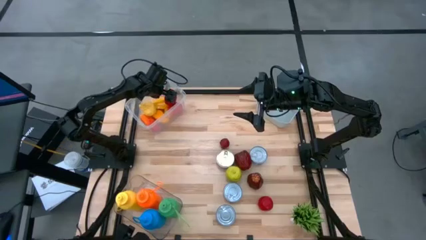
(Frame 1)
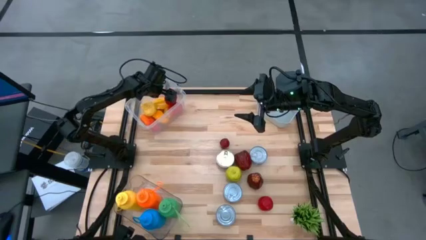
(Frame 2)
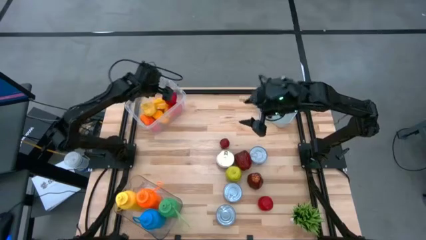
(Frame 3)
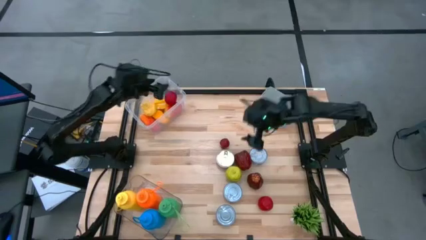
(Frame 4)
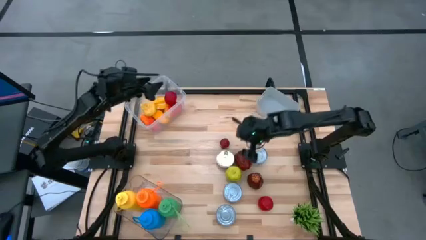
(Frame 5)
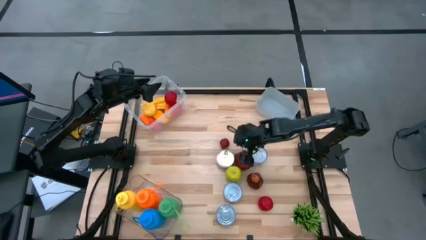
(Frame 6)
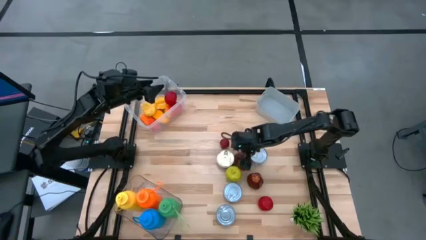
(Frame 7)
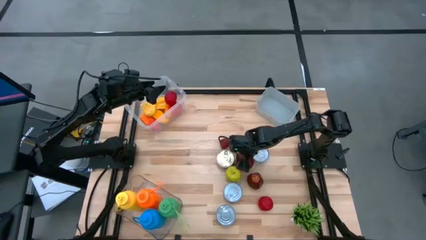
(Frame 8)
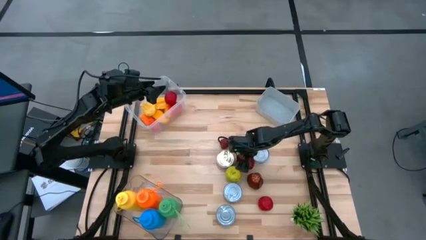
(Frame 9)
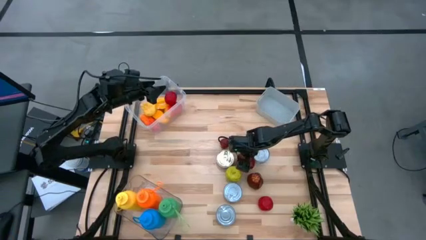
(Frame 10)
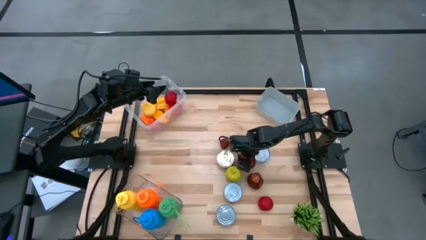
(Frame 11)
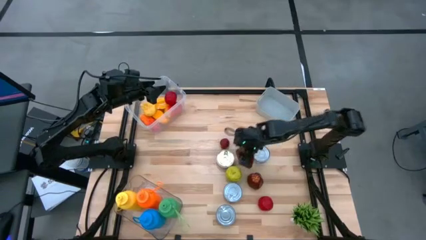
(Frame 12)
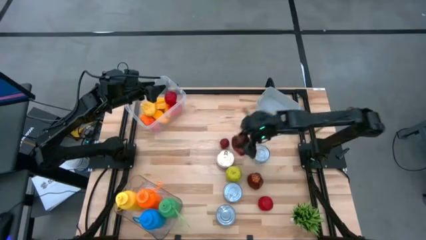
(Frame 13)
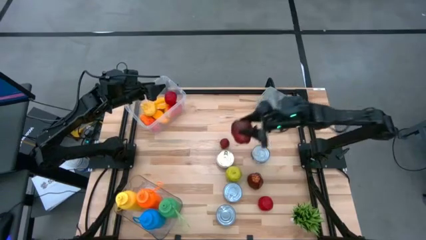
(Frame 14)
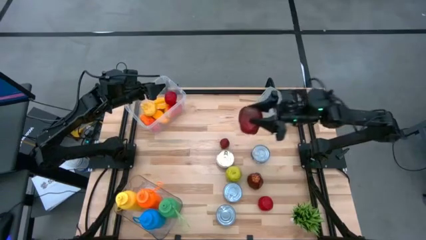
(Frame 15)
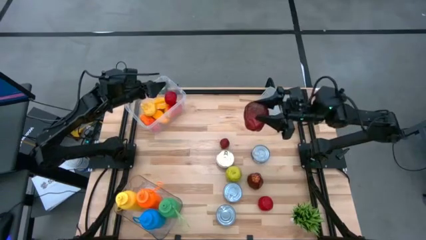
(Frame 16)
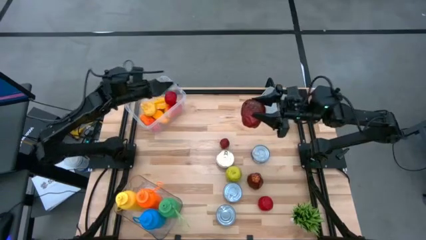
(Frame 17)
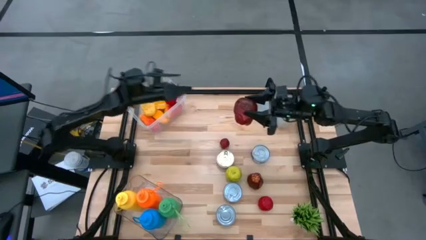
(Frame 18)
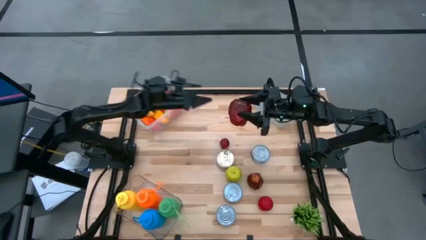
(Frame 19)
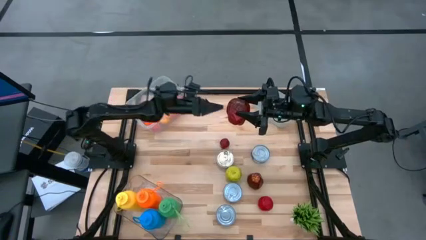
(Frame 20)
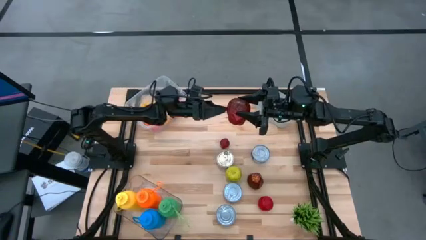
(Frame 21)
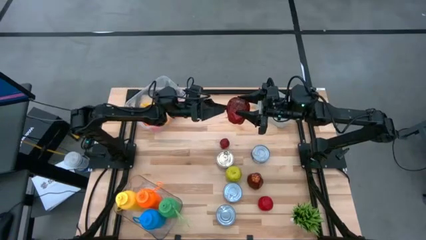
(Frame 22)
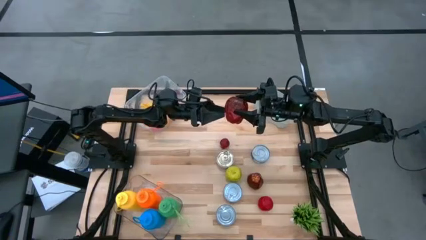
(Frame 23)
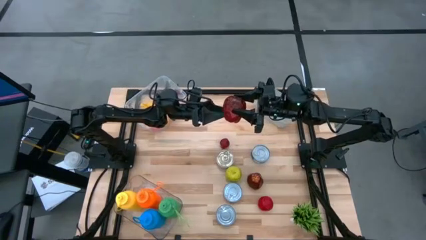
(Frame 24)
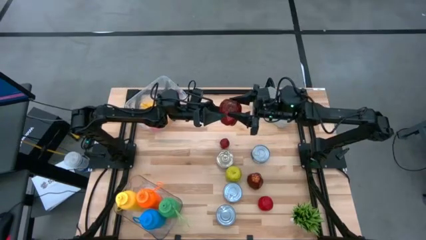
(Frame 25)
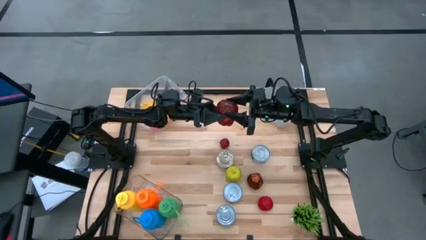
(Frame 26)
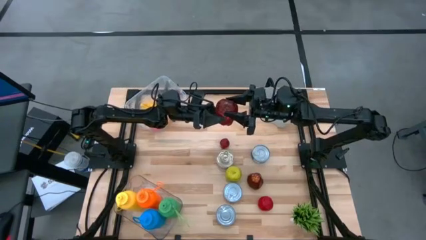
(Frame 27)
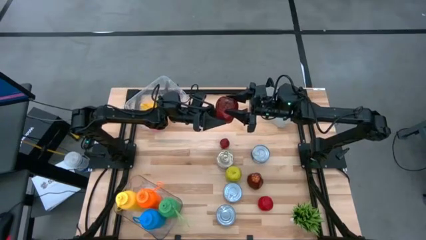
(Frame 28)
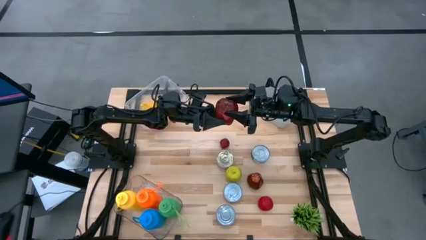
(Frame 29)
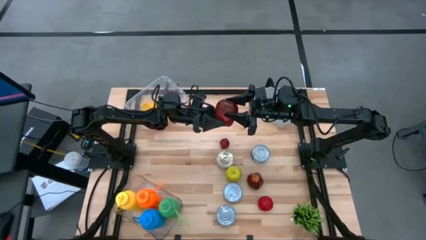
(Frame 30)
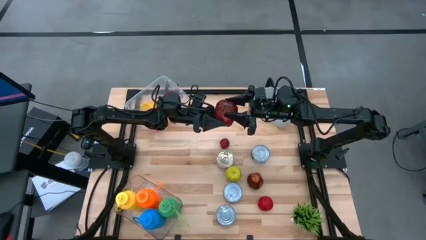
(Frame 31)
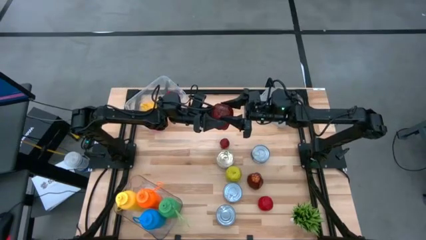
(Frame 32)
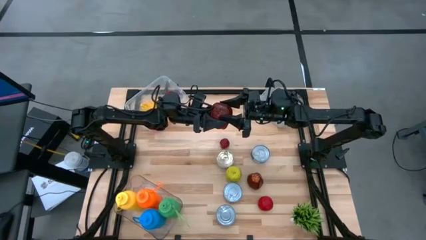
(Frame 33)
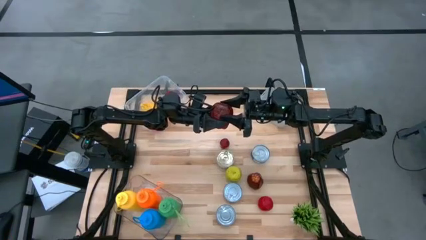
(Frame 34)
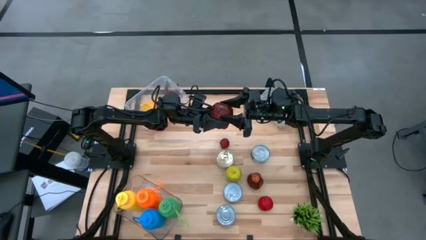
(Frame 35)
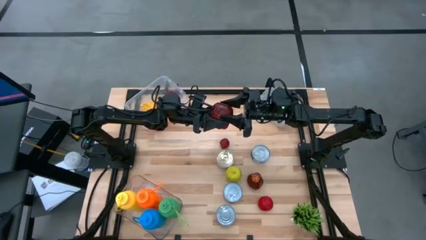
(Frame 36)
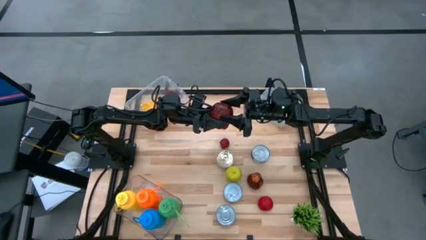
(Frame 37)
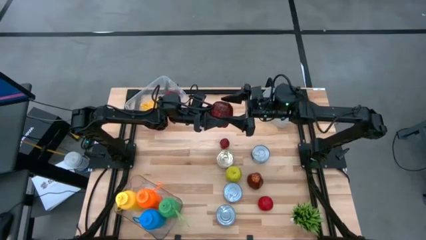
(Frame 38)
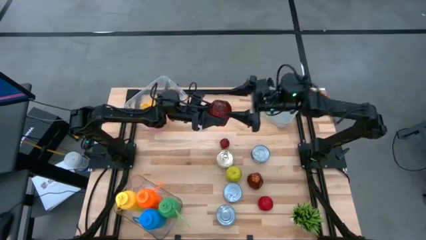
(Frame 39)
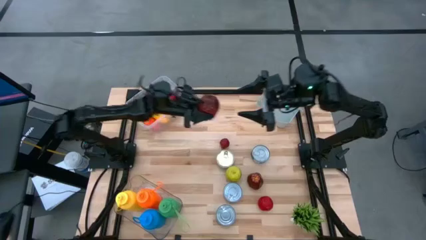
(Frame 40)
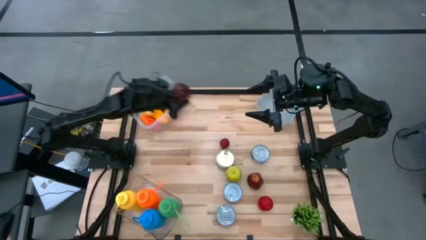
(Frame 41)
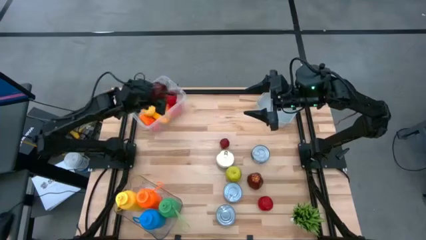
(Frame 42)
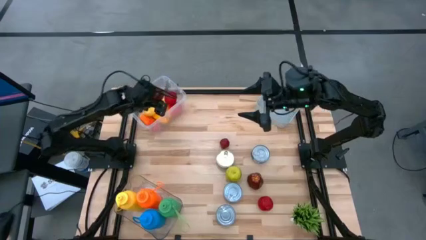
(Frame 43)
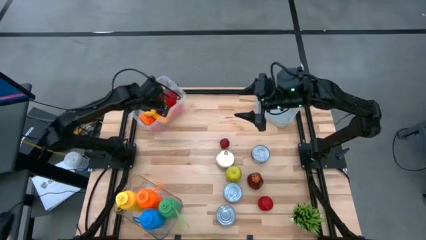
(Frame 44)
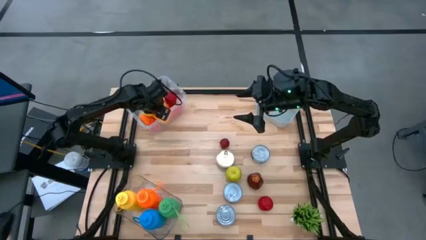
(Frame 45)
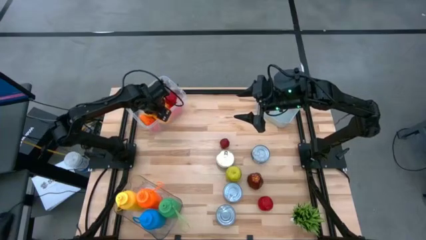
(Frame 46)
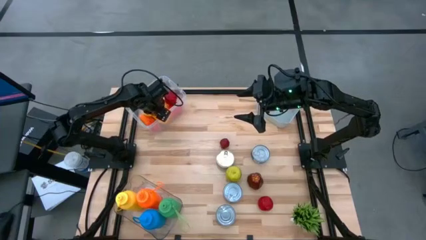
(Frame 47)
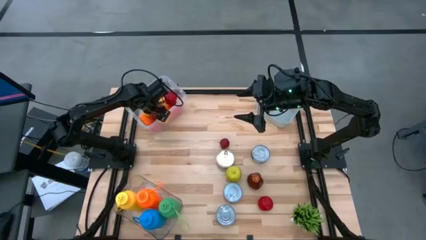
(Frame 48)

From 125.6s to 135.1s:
Task: Pick & Place Food Item
Put the red apple into the white bin

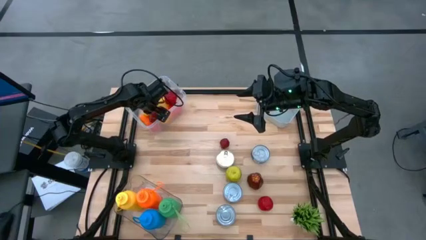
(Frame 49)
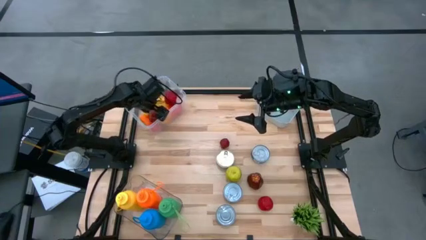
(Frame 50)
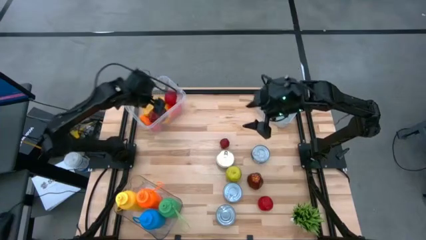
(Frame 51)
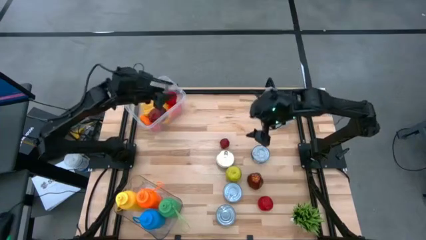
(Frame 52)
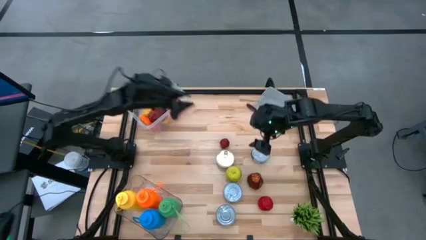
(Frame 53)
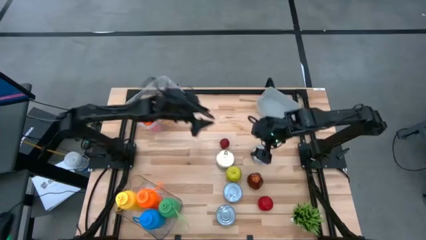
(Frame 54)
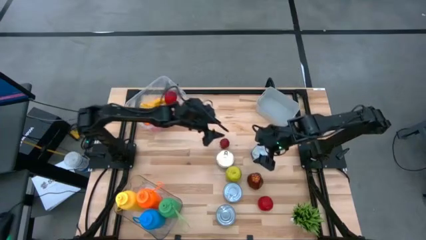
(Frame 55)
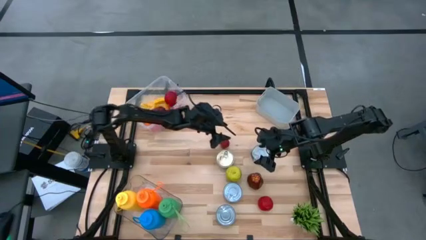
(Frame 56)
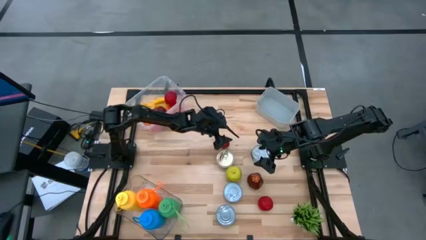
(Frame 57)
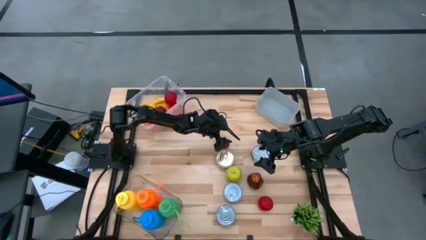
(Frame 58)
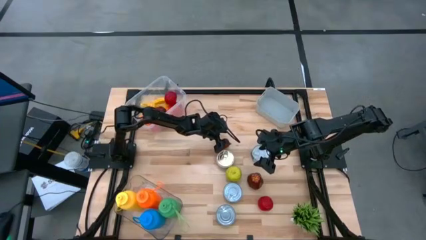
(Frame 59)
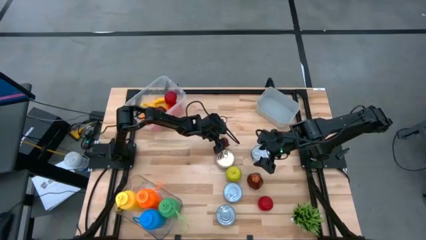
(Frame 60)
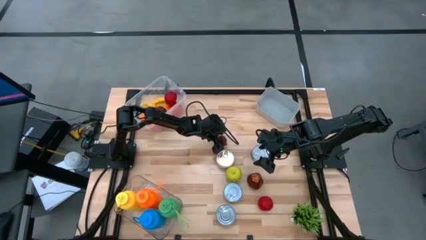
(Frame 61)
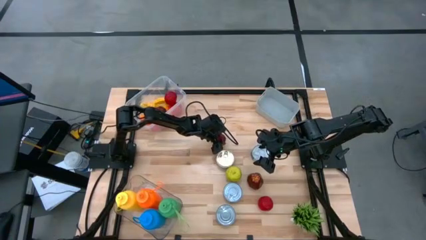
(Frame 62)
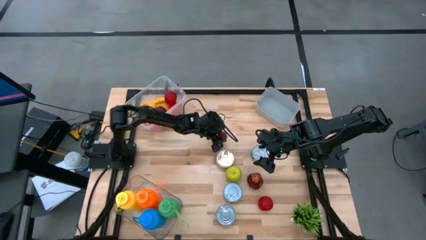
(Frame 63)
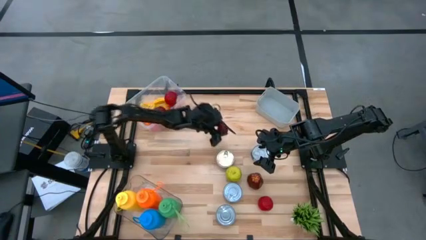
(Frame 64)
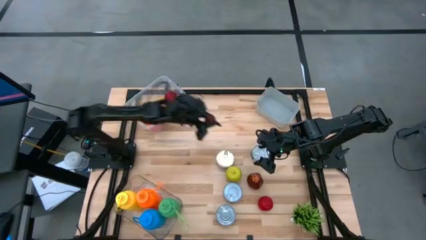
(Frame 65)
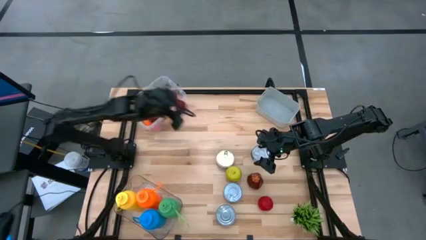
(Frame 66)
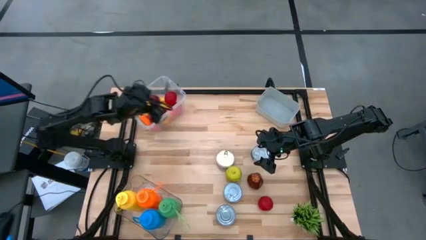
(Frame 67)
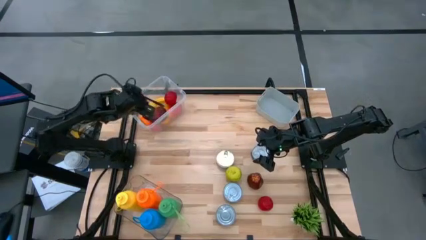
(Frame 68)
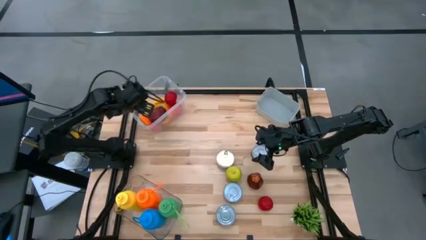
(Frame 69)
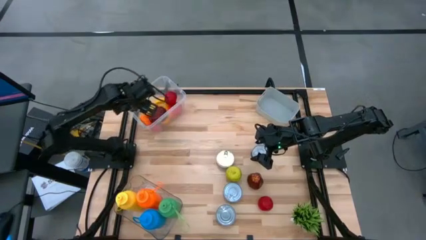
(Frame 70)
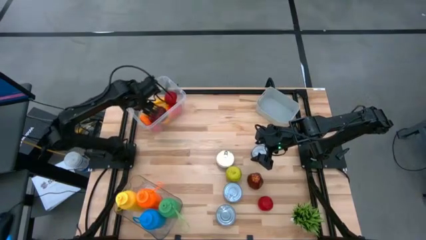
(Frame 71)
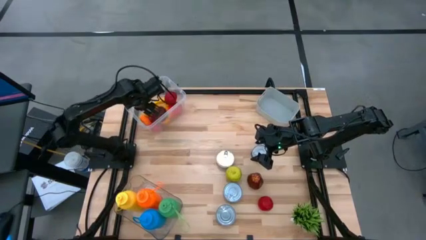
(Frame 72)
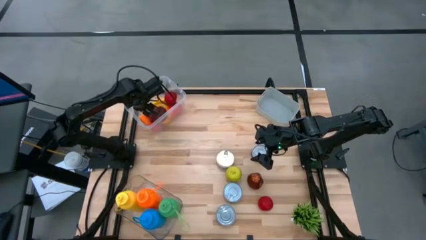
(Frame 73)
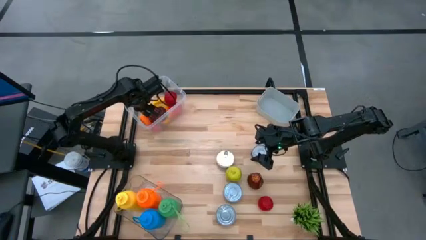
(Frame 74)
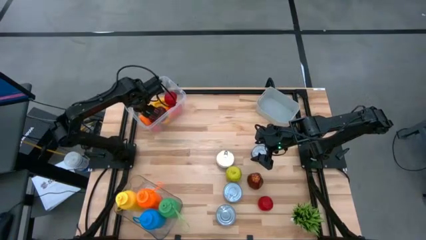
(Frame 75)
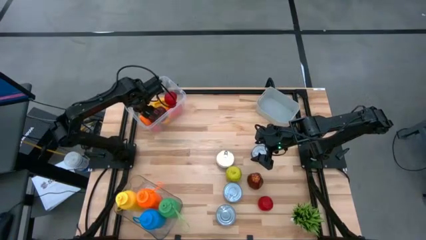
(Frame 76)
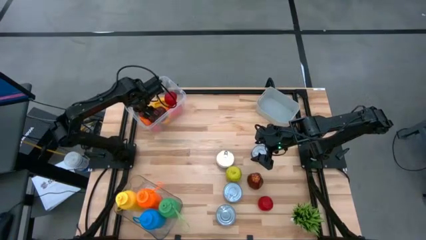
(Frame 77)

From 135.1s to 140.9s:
Put the red pomegranate into the white bin
